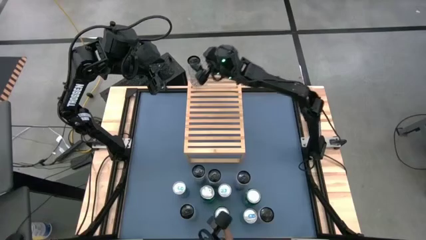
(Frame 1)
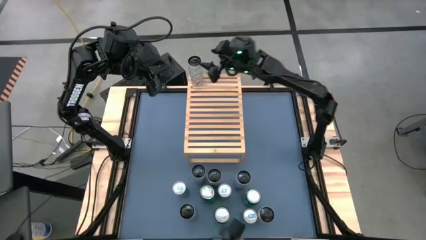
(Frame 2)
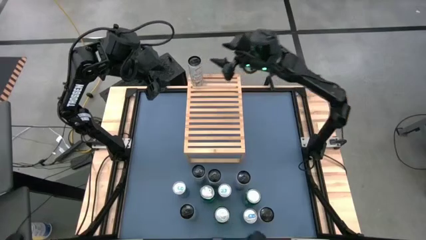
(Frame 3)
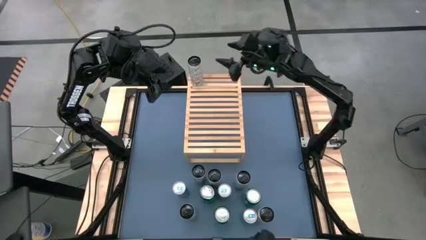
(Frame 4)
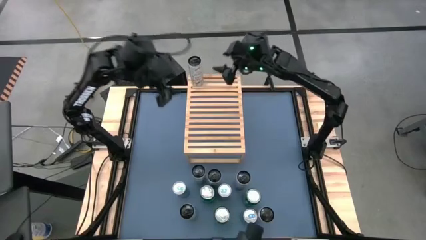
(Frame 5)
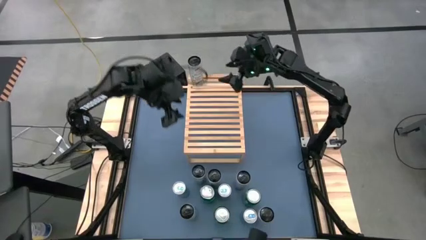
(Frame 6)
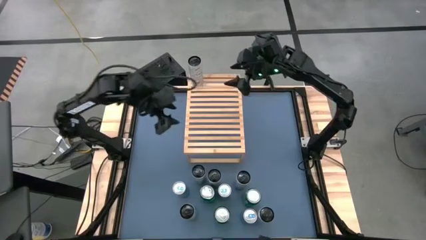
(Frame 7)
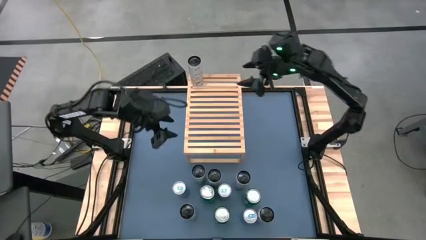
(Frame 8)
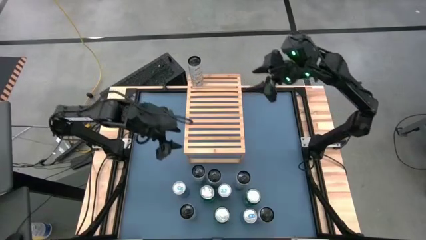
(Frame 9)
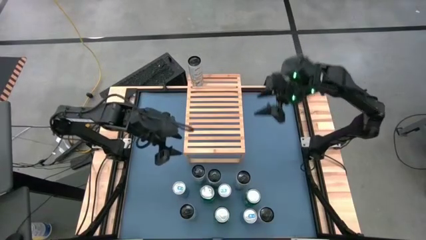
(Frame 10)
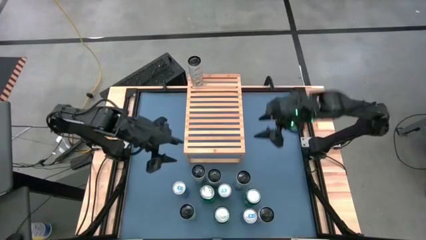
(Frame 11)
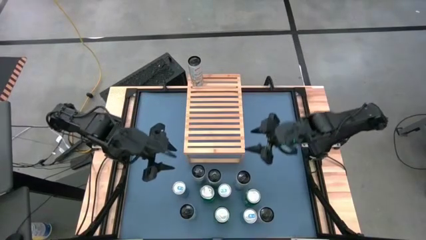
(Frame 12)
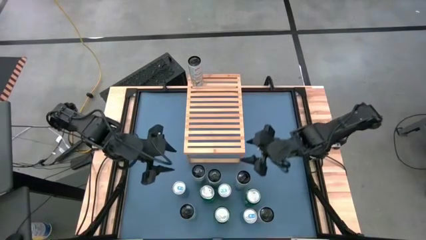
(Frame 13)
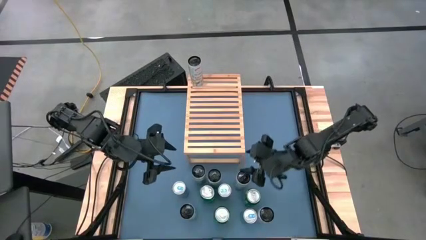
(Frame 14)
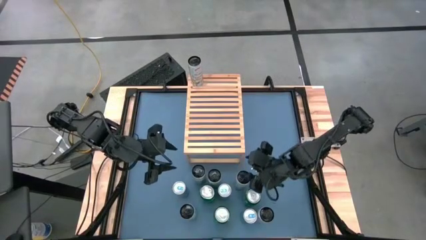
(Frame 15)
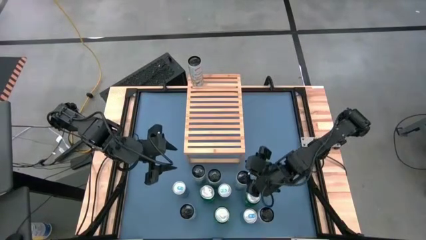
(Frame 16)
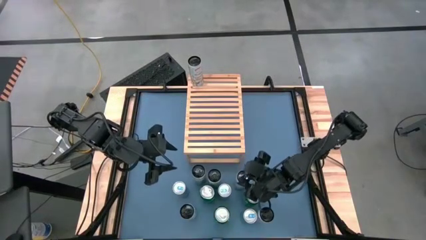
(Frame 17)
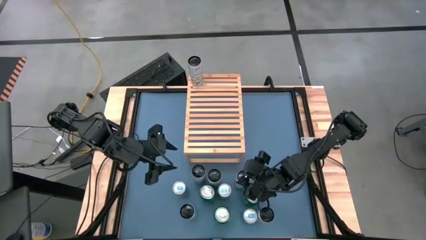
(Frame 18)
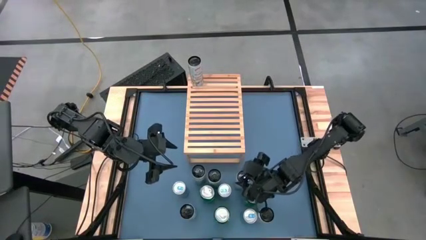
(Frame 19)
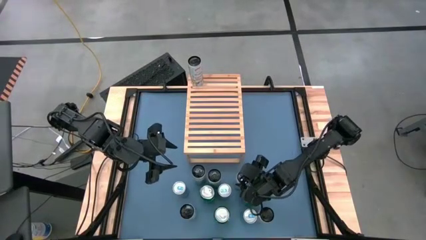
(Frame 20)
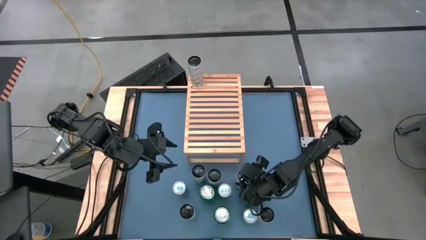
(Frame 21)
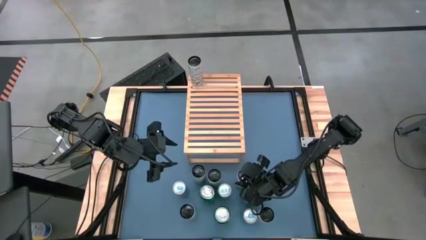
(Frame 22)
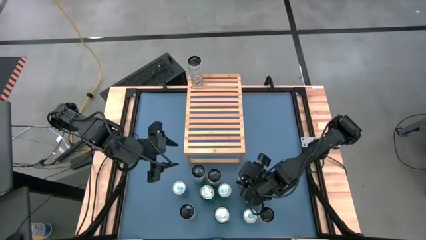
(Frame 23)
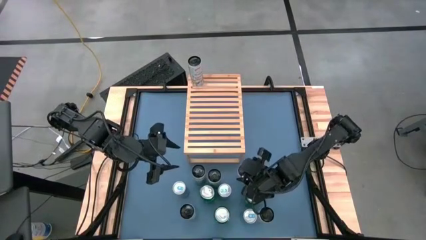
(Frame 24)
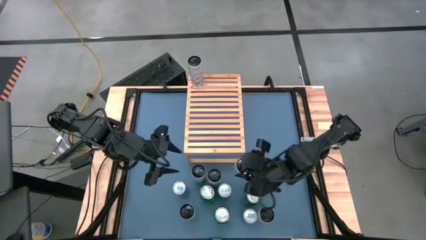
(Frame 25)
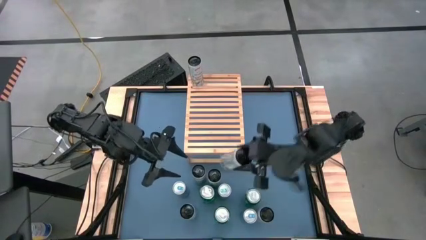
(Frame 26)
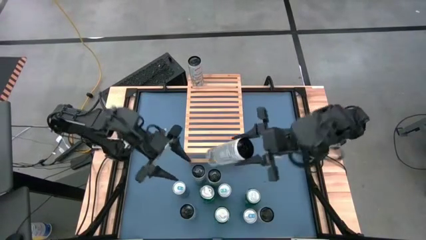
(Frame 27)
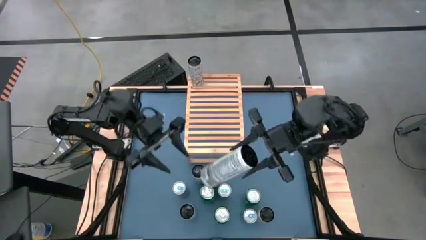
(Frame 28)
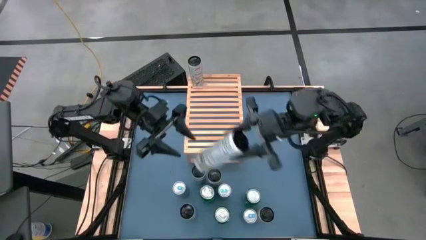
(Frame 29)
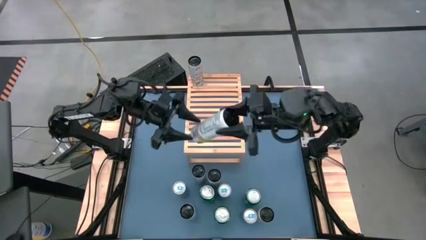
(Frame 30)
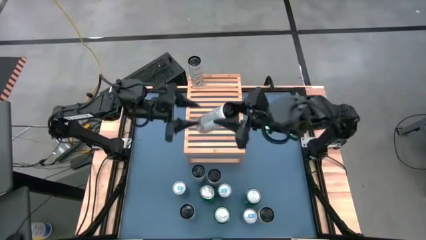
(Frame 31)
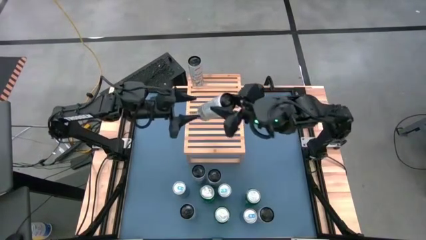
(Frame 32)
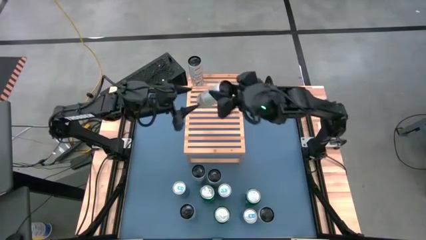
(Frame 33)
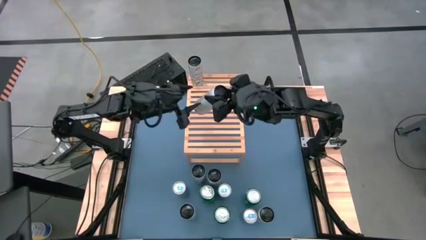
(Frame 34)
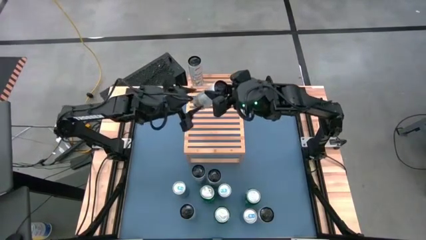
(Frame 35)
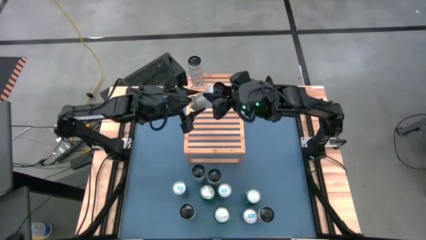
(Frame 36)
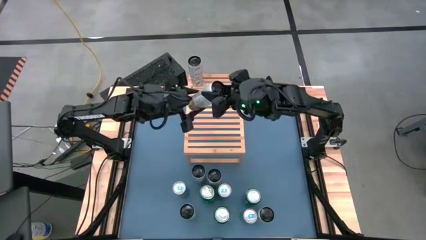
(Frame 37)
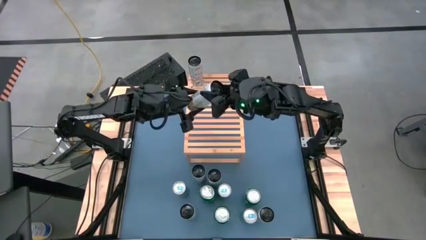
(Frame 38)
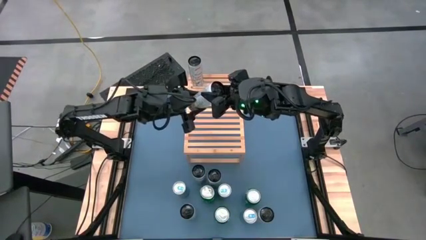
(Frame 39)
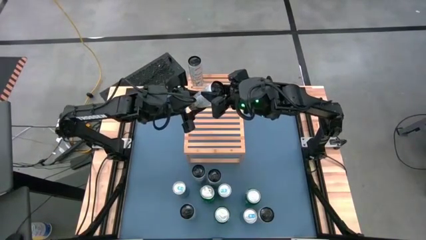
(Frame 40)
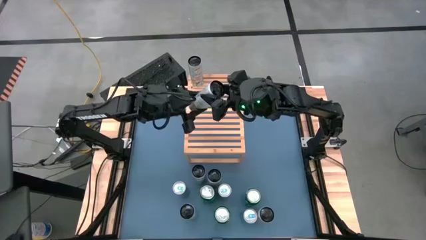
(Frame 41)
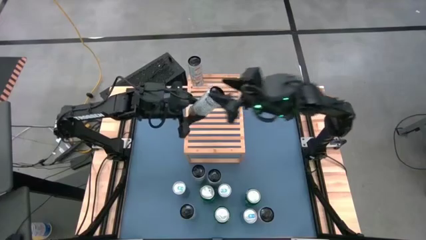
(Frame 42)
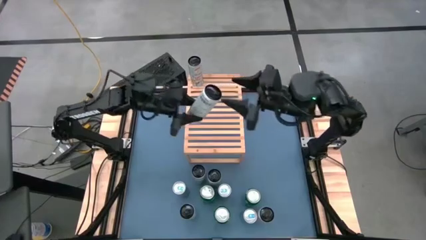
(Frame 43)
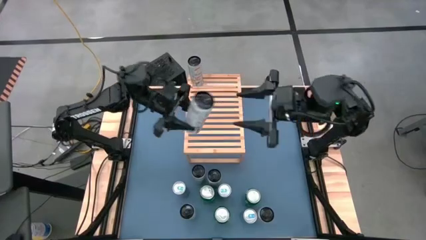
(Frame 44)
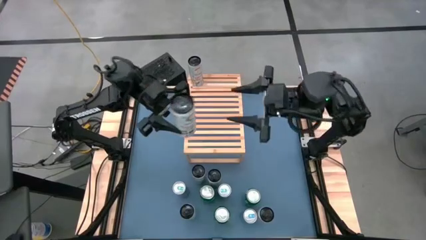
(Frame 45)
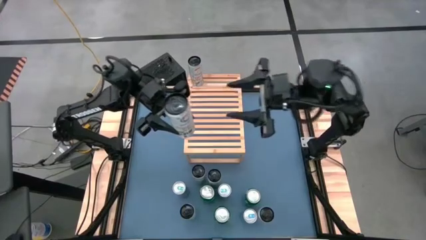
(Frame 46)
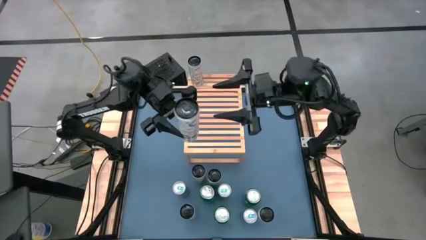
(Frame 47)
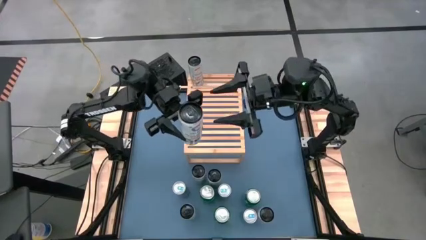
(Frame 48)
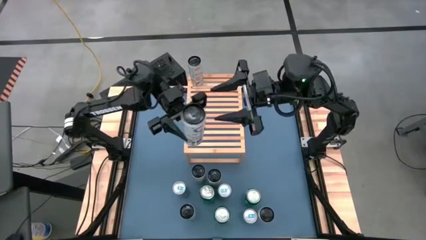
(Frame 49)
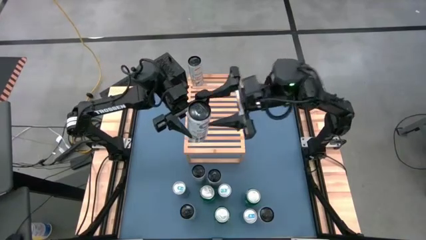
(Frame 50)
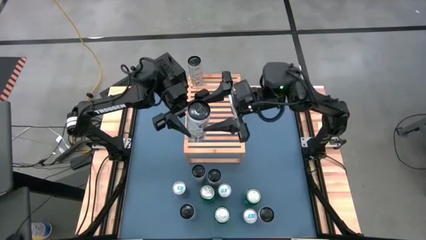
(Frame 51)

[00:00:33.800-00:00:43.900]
Task: Place canned beverage on shelf
Put the white yellow soda can on the shelf aligned with the other white yellow soda can
